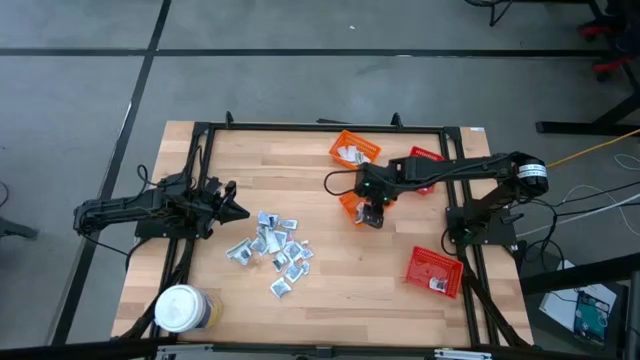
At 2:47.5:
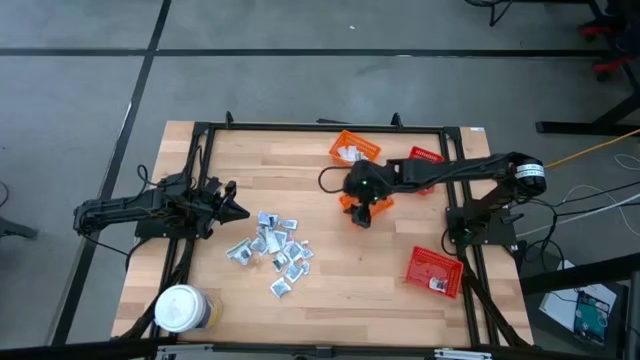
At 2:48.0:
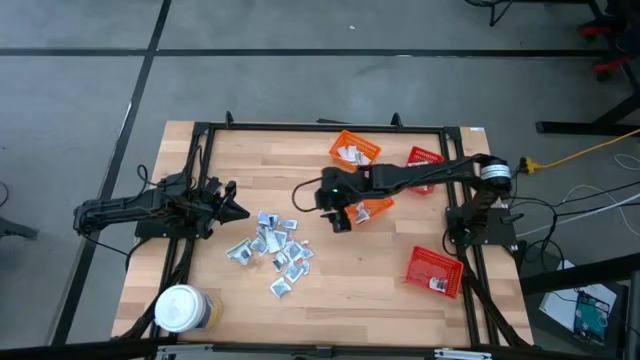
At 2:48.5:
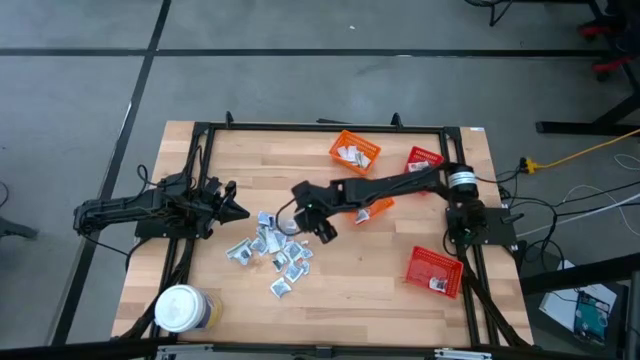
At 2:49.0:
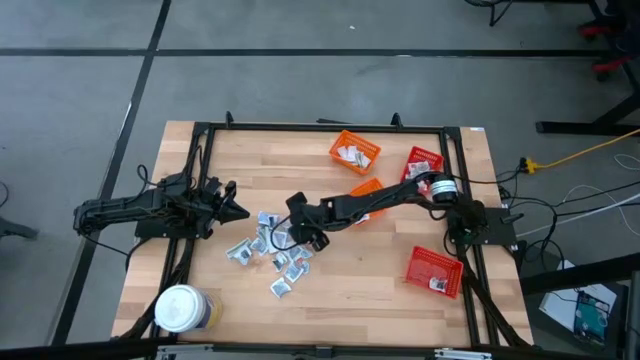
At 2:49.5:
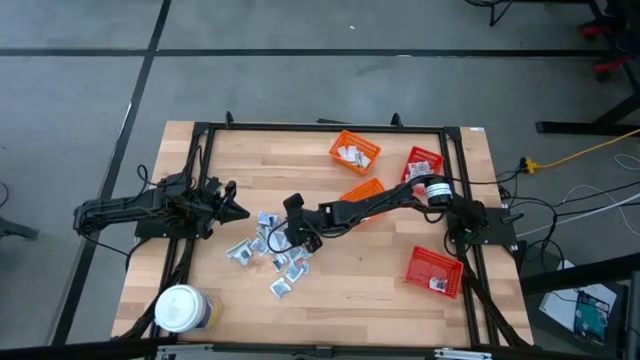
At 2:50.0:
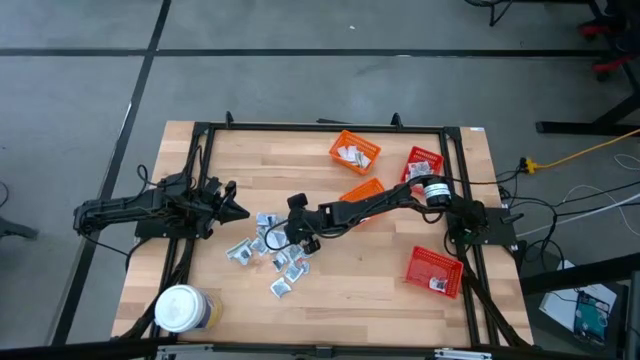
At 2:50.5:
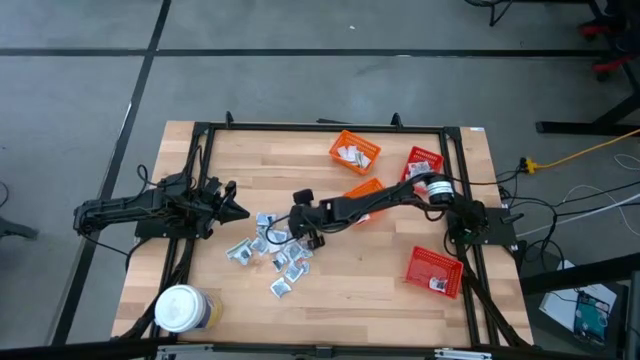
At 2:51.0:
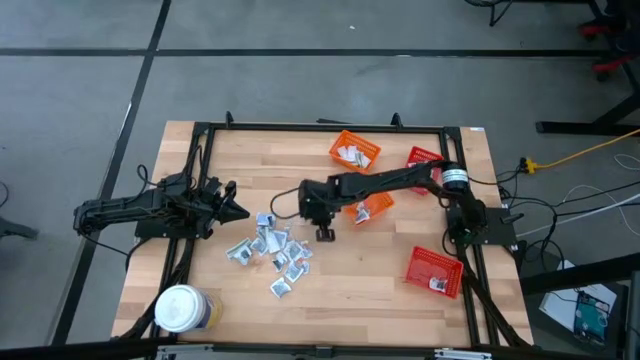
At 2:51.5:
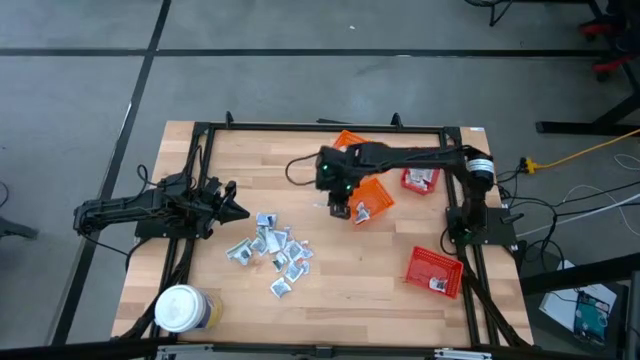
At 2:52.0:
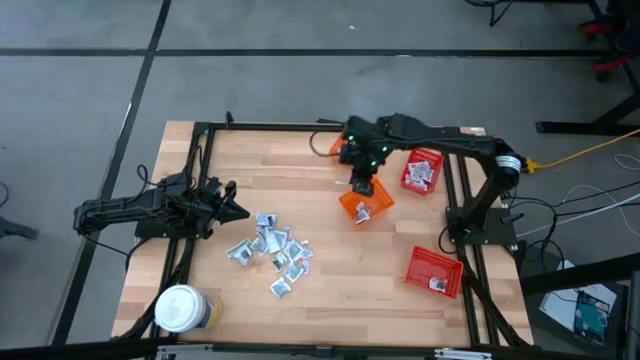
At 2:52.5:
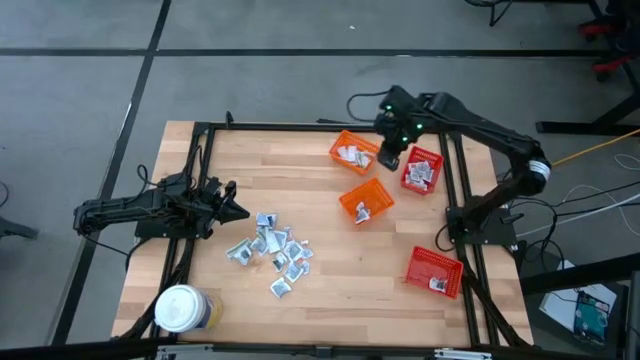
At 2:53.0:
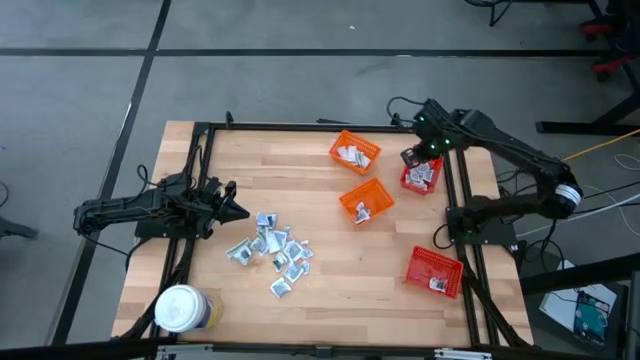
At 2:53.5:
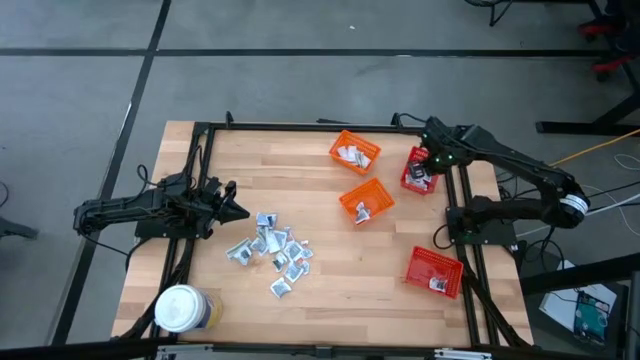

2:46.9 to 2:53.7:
Task: Pick & Place First Aid Supplies
Put the orange ointment pack into the top red bin

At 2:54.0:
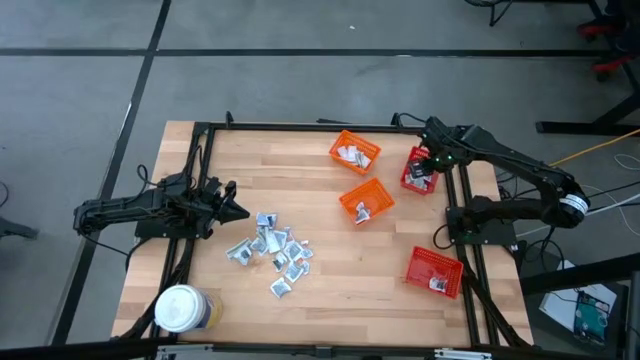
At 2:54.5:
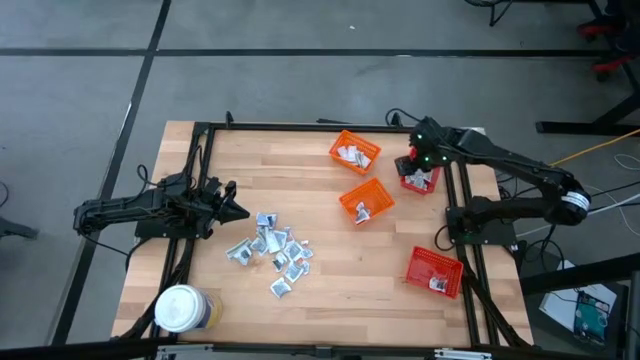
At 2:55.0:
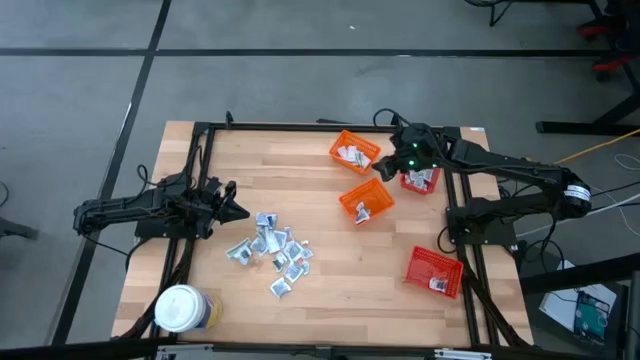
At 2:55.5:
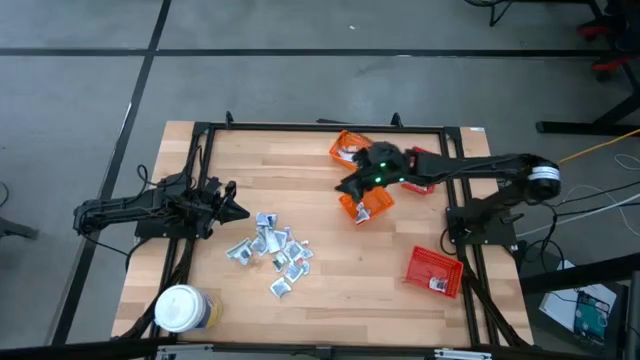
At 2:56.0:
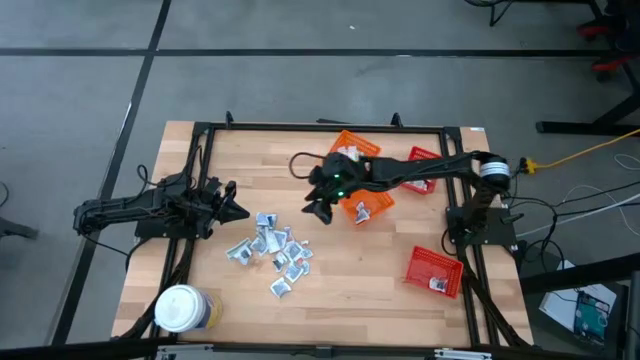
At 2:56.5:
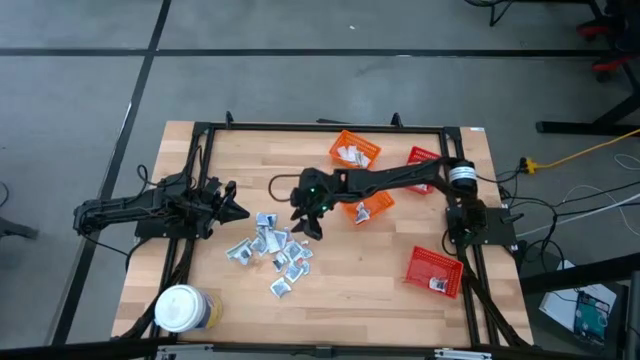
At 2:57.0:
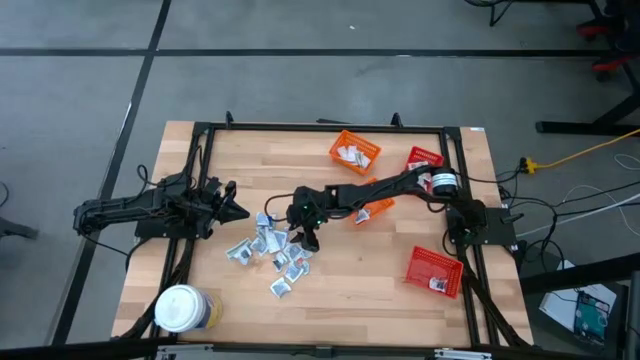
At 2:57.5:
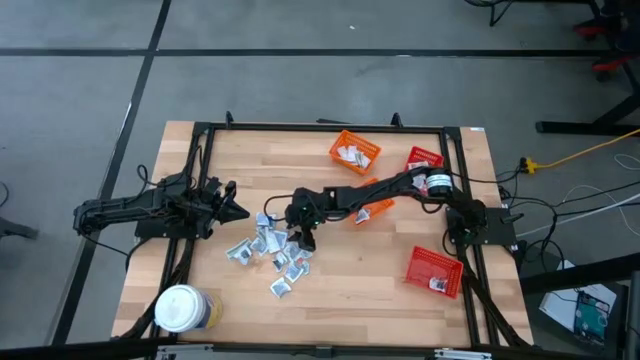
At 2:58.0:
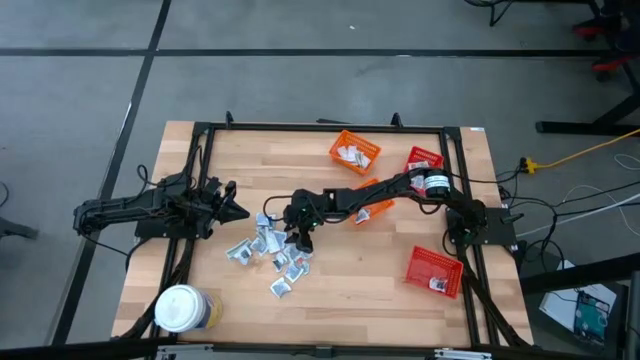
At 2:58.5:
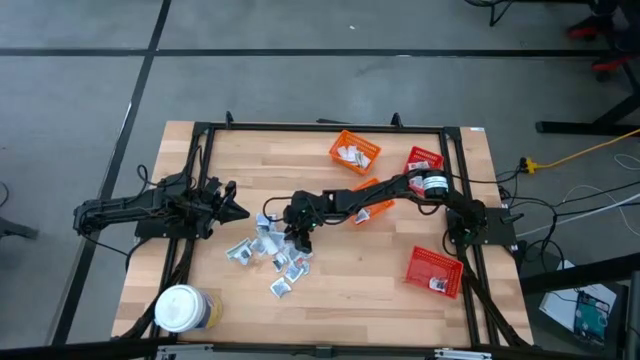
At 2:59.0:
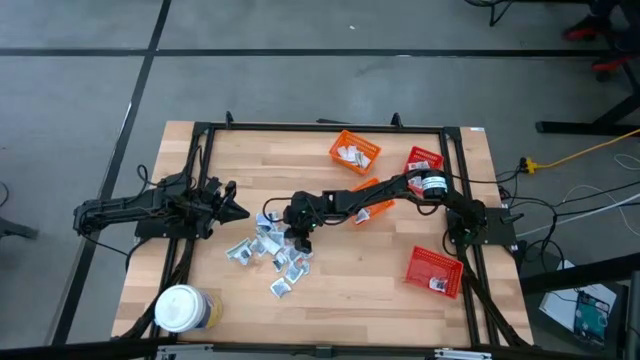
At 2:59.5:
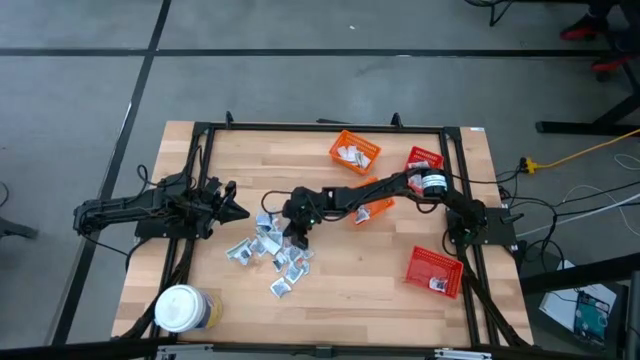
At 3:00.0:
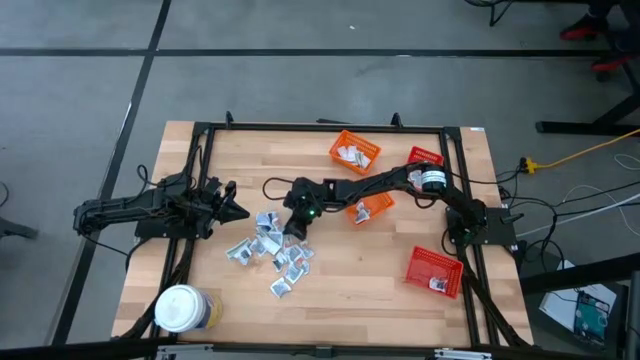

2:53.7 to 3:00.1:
Put the orange ointment pack into the top red bin

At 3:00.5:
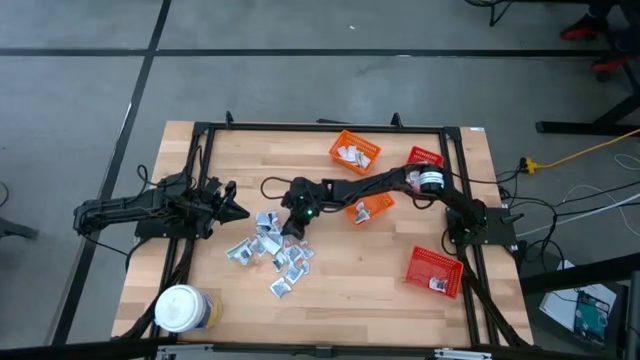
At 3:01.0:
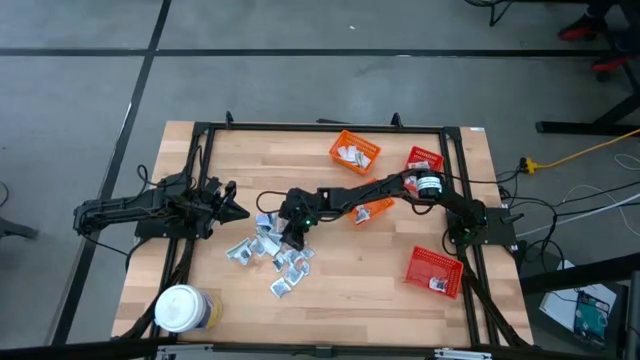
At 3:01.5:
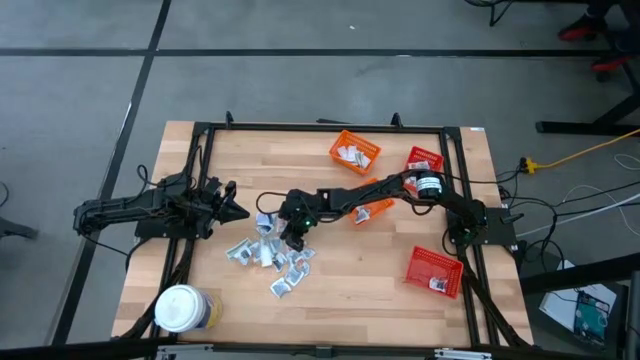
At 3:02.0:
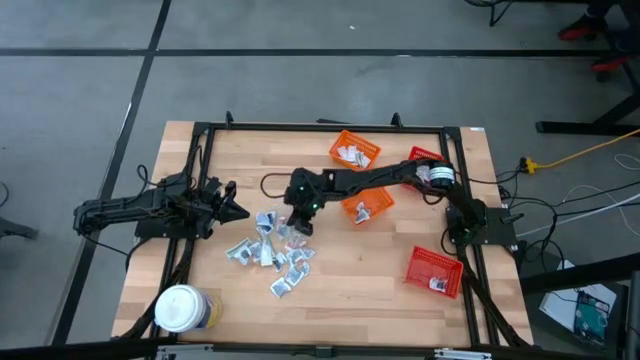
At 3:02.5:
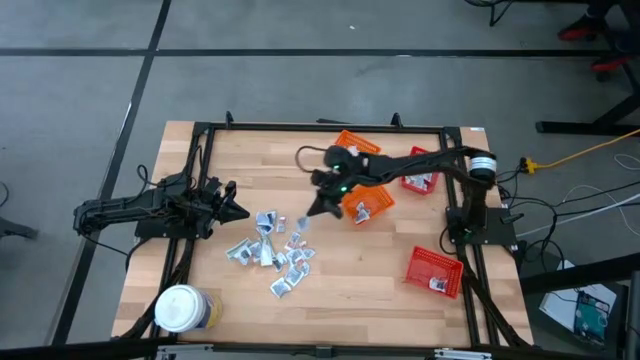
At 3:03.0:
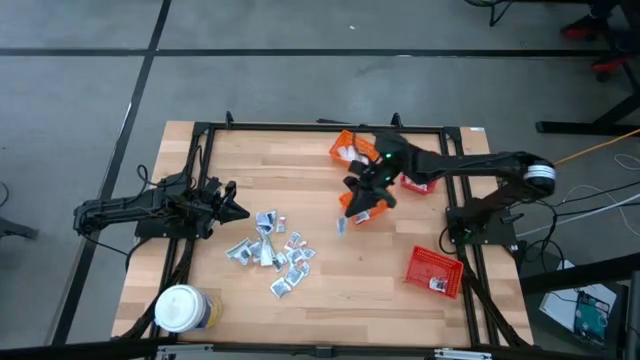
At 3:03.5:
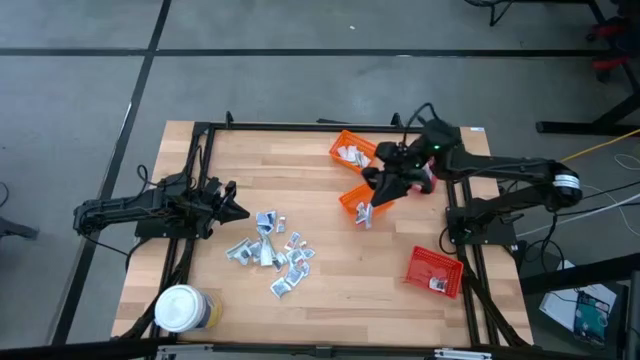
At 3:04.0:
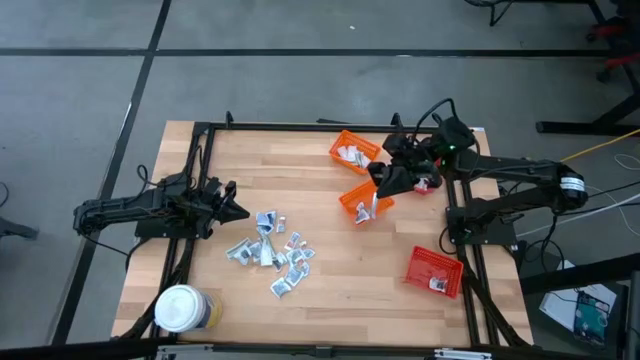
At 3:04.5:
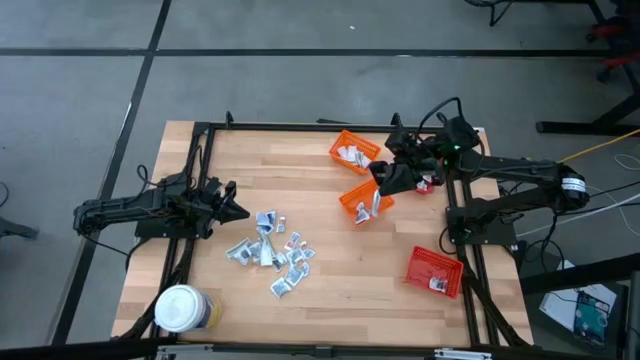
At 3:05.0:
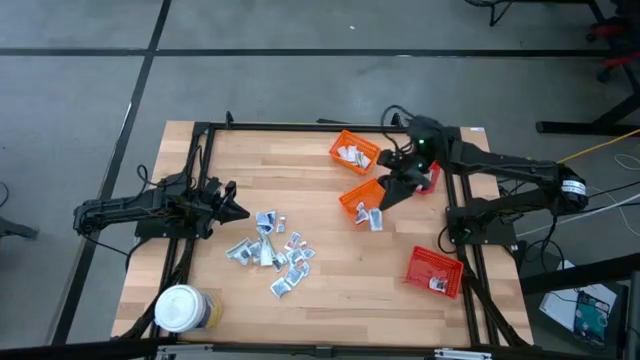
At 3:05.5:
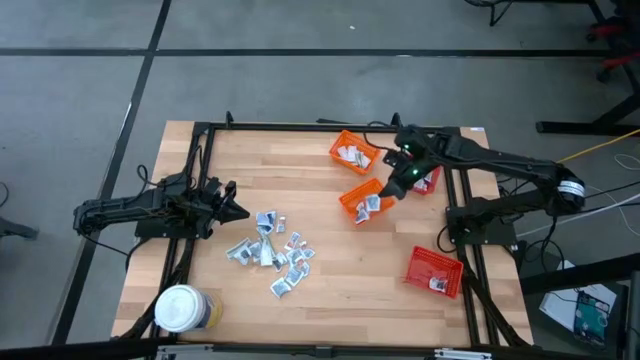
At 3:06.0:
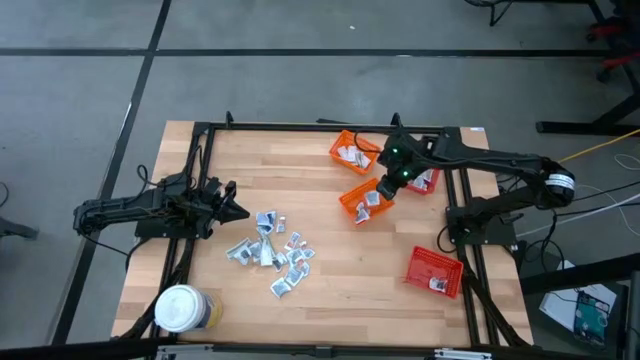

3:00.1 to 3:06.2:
Put the blue alcohol pad into the bottom orange bin

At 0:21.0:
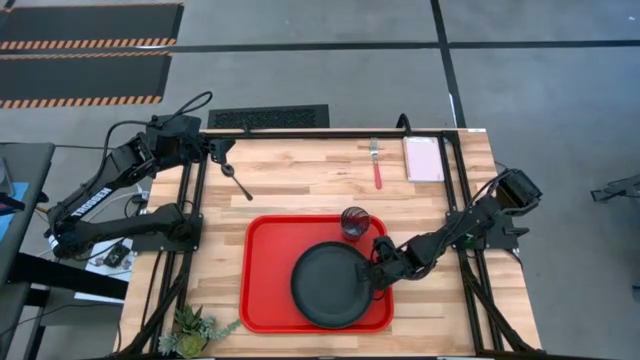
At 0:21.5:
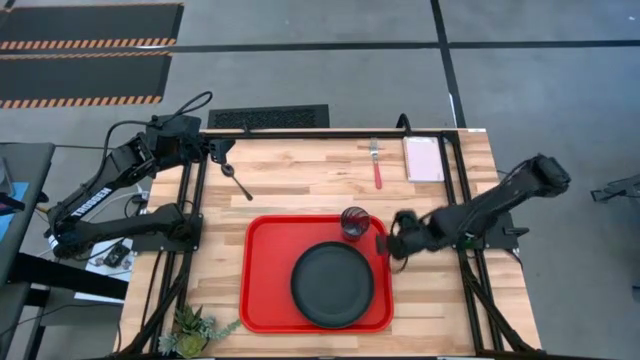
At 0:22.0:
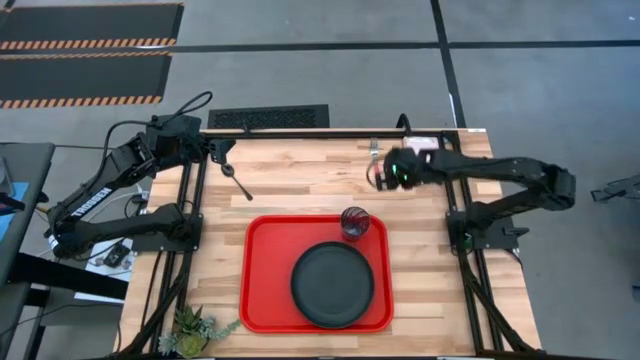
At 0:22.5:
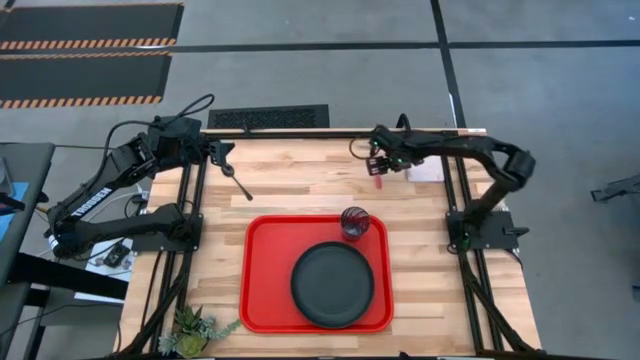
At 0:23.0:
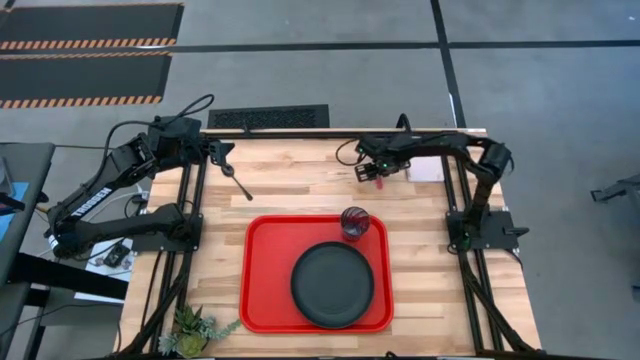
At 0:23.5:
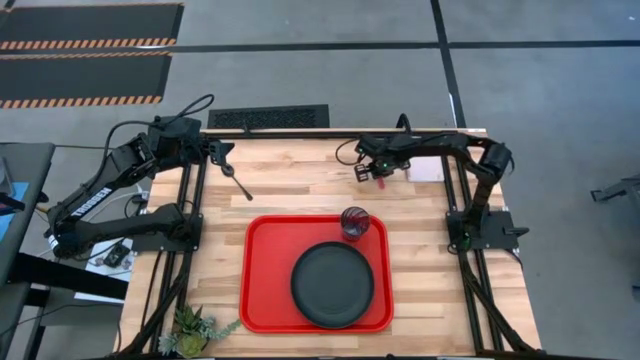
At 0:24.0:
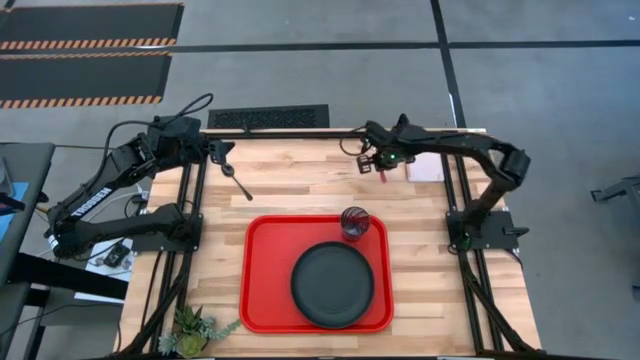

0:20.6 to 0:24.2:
Task: Pick and place plate/cup/fork/spoon on tray
Put the pink fork on the left side of the red serving tray
